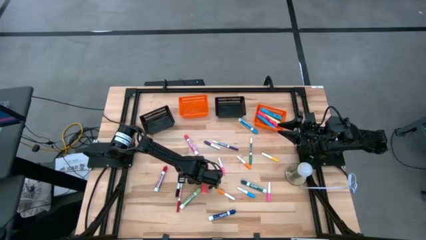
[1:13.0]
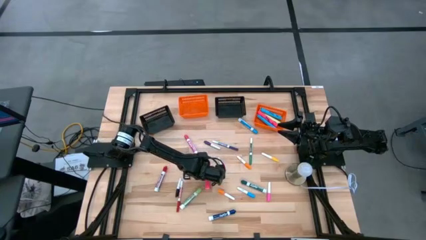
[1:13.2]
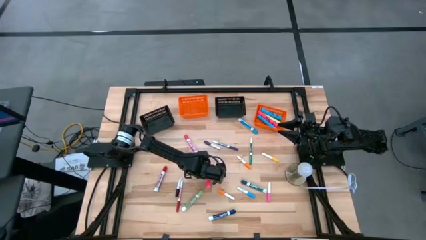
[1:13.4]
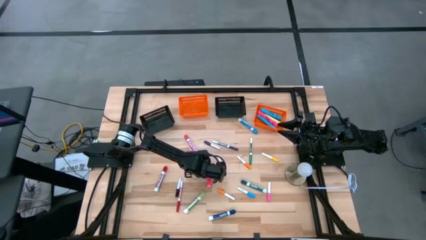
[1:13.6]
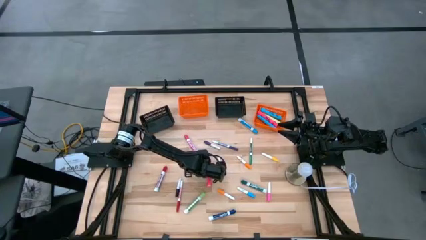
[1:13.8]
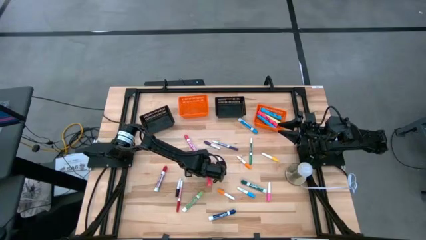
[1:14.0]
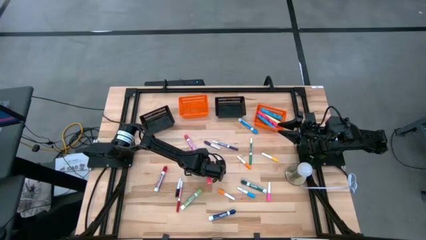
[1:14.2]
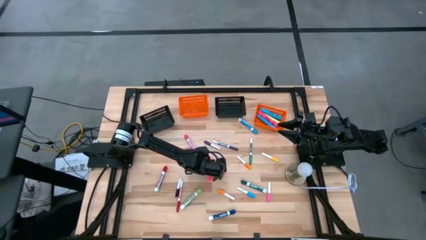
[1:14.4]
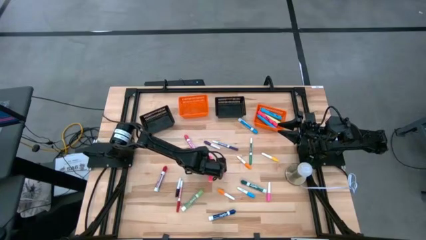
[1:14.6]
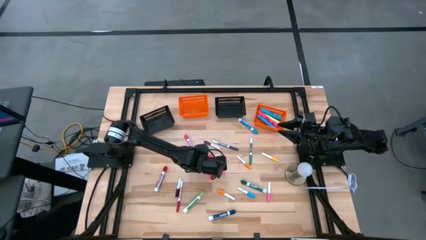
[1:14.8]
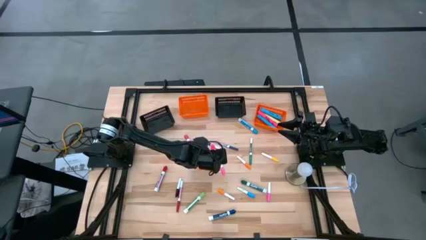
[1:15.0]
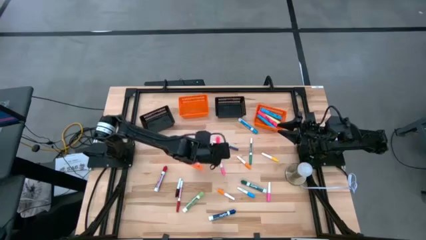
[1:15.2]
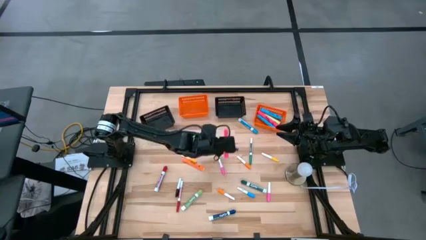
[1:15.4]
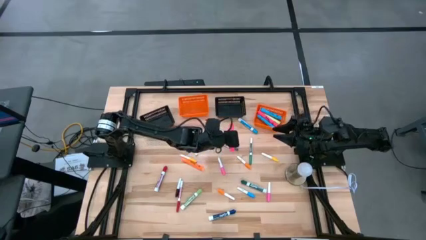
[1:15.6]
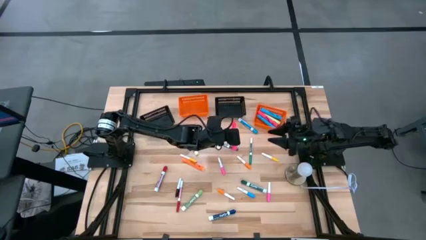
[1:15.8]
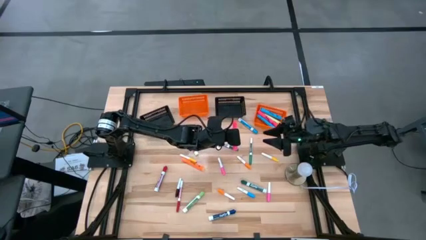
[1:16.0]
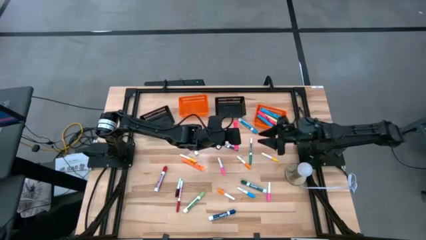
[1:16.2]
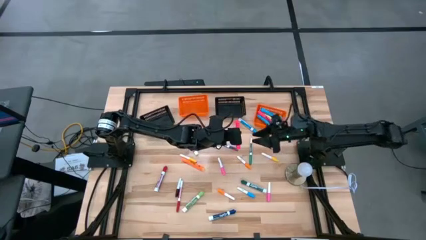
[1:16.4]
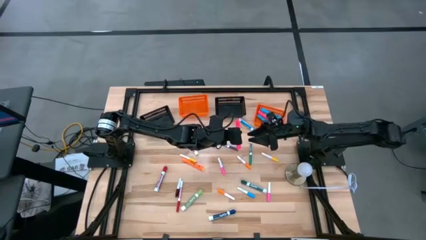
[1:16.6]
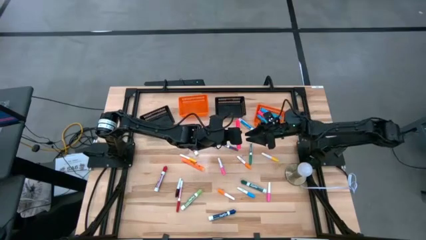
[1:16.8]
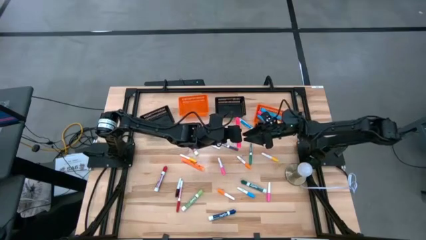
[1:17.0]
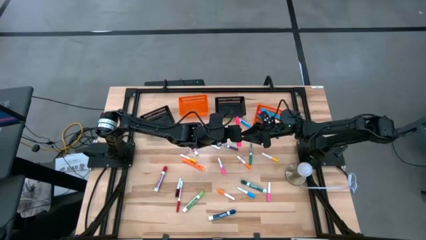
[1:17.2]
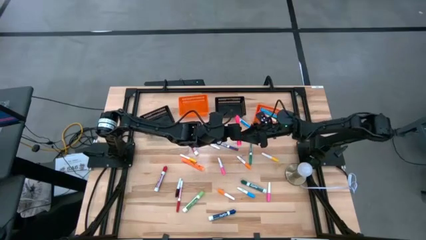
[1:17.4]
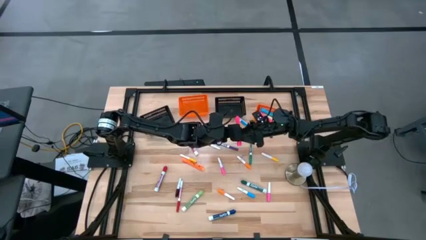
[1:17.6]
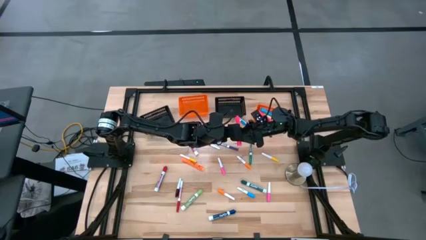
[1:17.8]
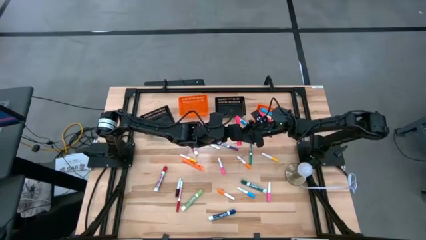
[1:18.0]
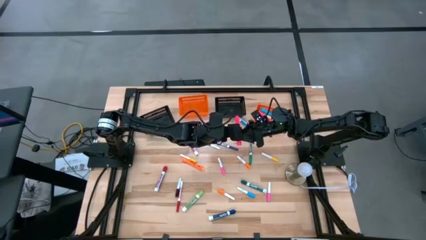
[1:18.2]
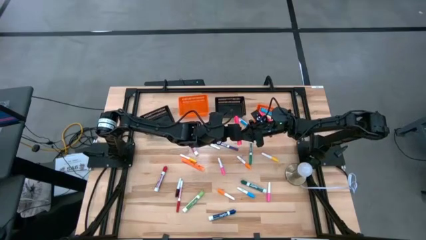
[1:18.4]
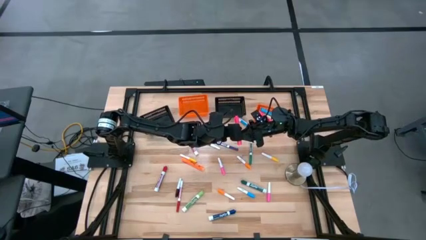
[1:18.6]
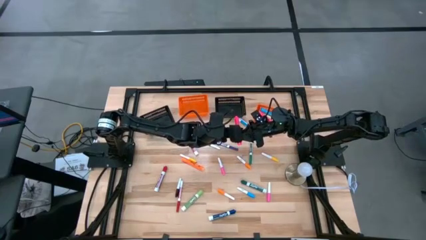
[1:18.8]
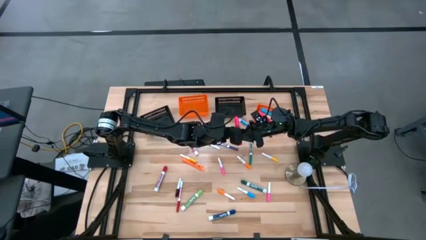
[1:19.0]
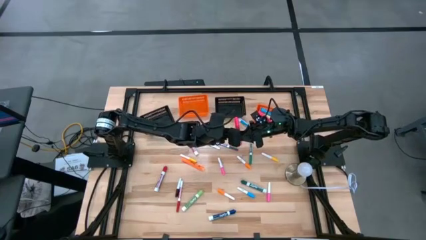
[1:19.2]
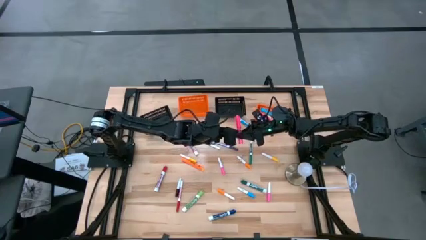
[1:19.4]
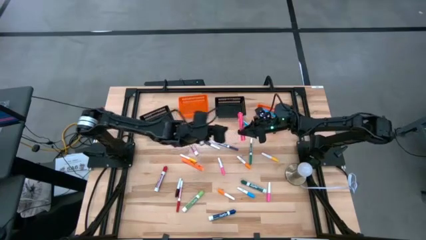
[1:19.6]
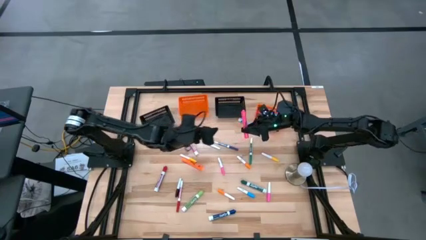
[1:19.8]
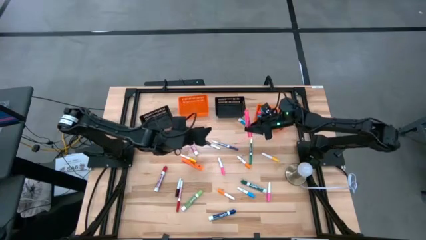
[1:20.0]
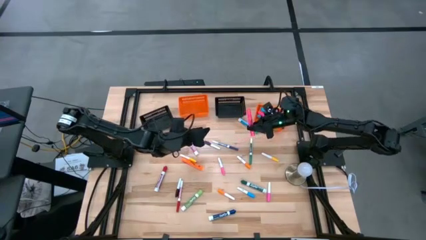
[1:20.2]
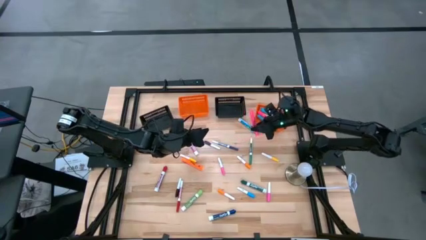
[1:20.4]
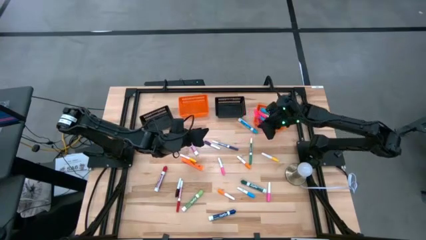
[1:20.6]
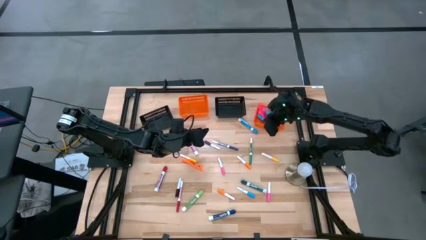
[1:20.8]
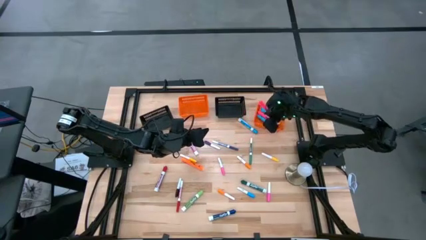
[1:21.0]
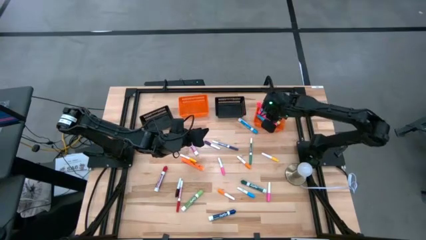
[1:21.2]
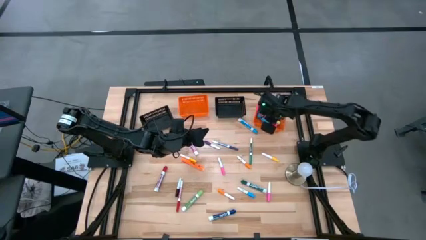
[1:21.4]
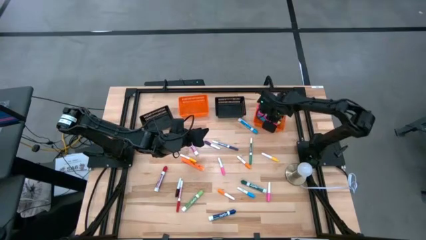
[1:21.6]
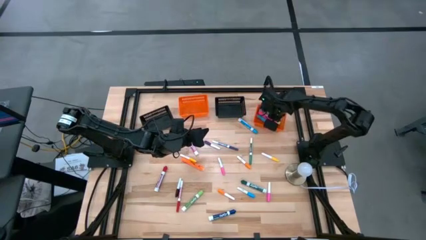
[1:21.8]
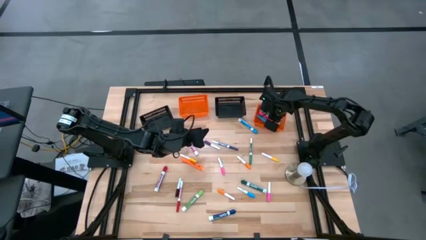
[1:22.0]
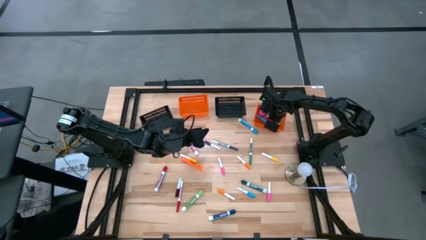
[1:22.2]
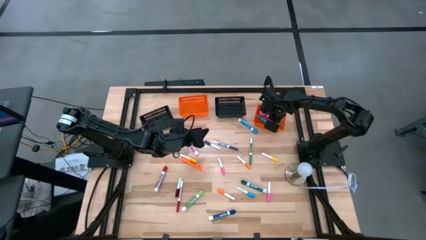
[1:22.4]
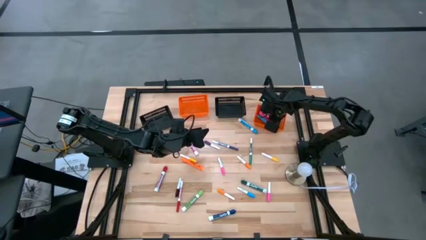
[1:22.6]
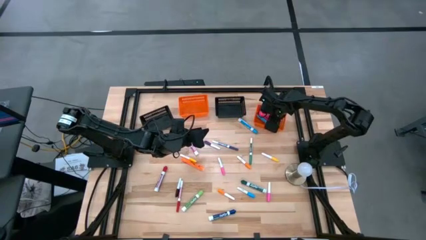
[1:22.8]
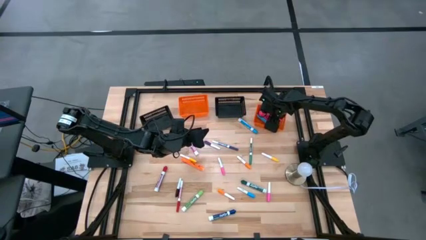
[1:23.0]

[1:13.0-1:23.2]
Task: Pick & Place Markers
Put the pink marker into the right orange bin

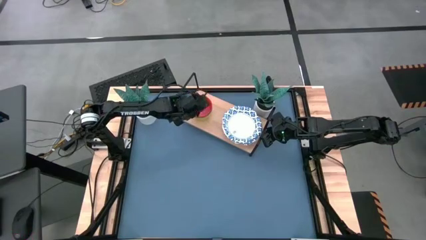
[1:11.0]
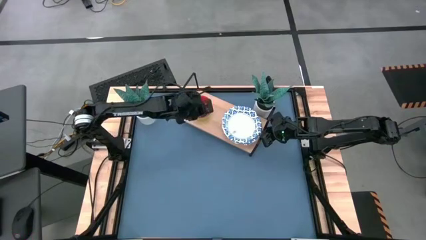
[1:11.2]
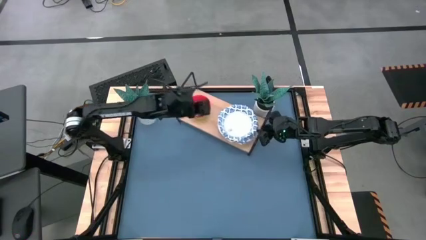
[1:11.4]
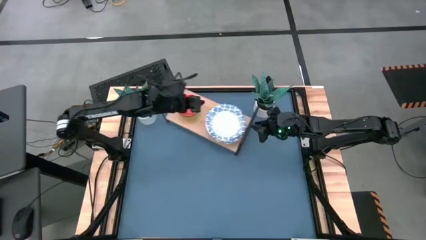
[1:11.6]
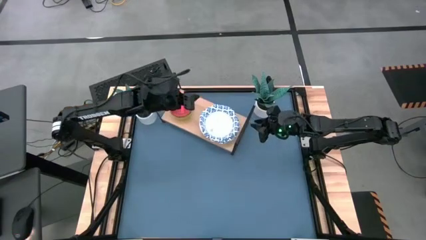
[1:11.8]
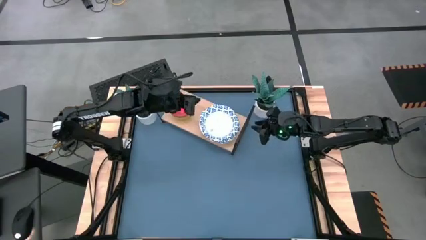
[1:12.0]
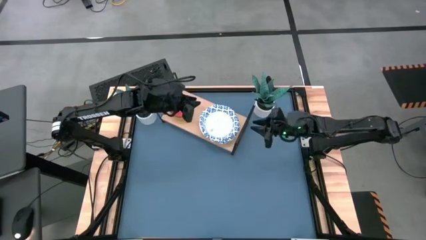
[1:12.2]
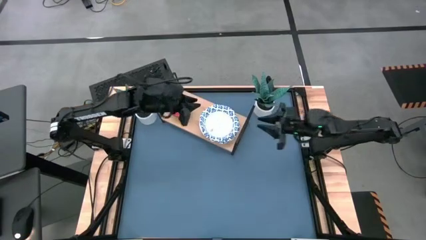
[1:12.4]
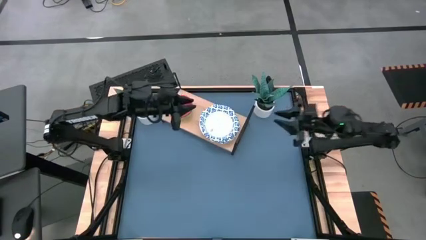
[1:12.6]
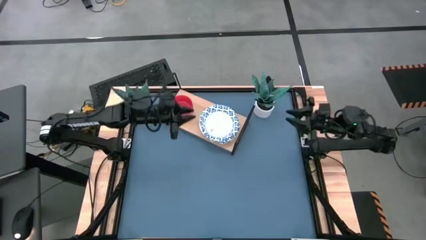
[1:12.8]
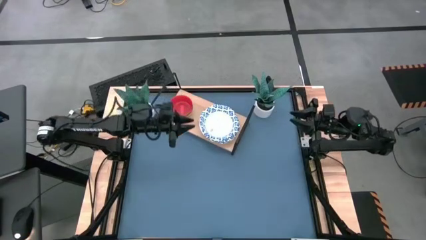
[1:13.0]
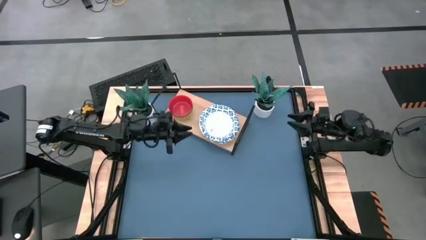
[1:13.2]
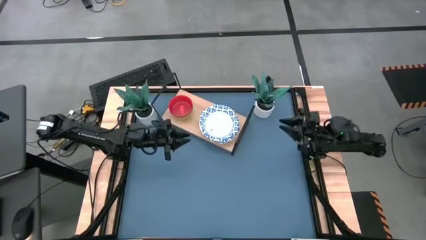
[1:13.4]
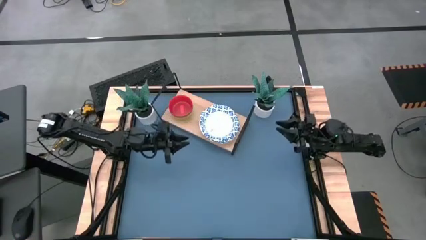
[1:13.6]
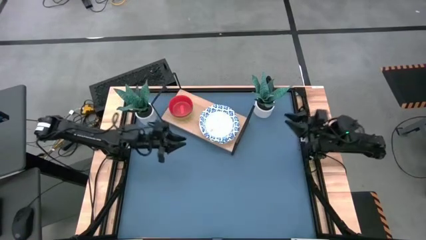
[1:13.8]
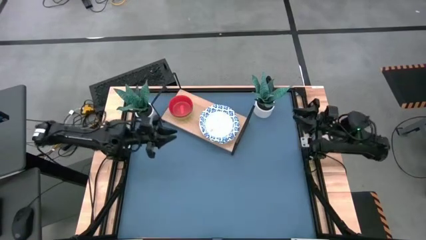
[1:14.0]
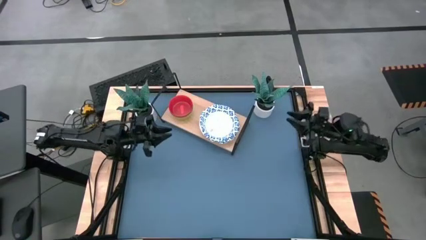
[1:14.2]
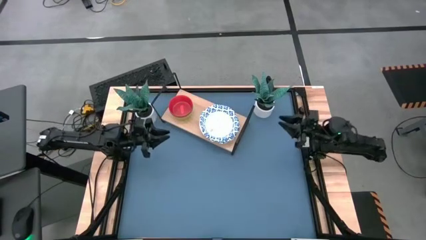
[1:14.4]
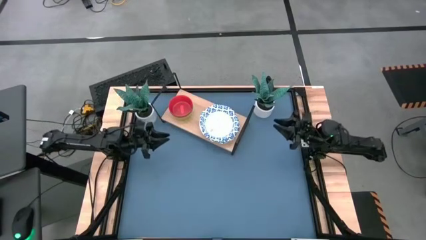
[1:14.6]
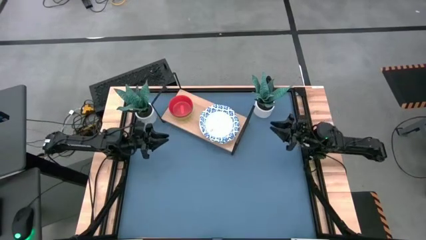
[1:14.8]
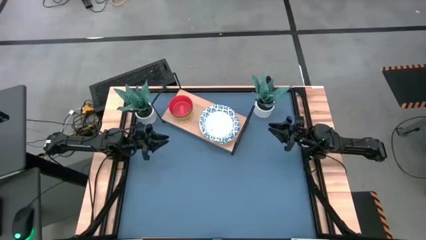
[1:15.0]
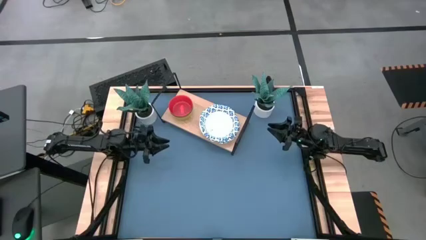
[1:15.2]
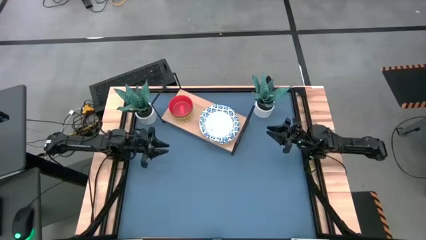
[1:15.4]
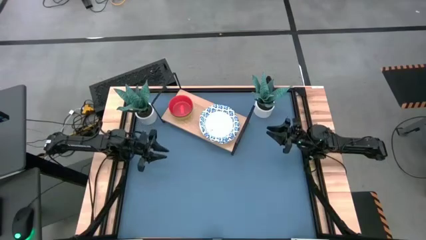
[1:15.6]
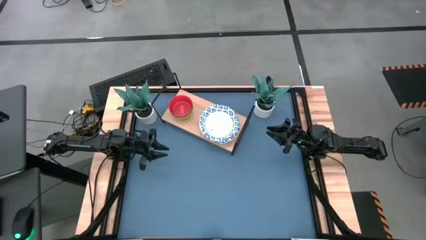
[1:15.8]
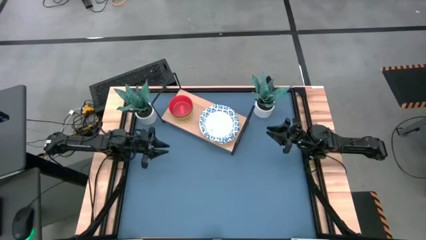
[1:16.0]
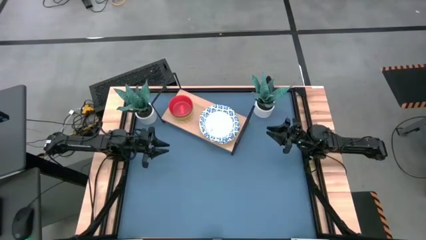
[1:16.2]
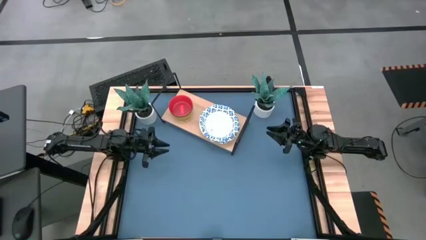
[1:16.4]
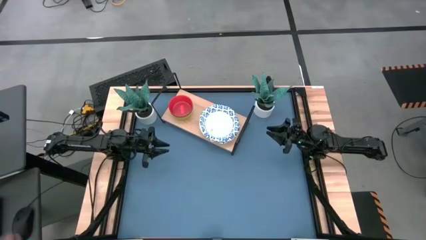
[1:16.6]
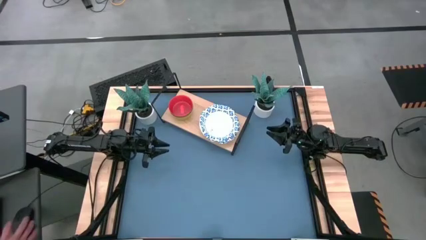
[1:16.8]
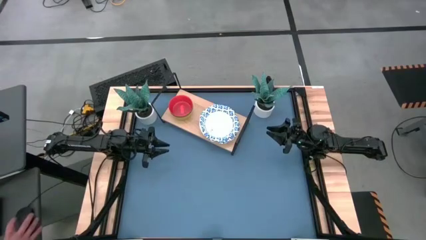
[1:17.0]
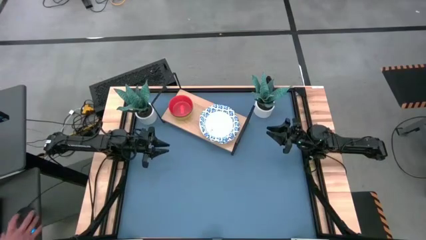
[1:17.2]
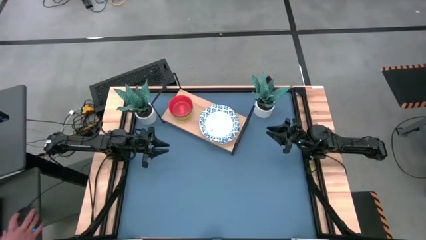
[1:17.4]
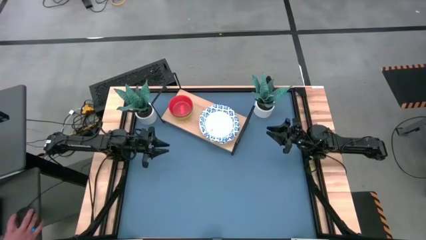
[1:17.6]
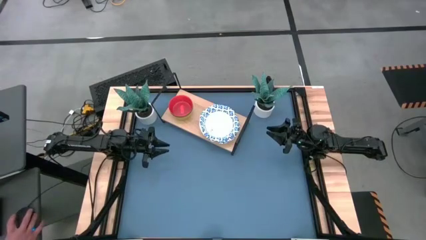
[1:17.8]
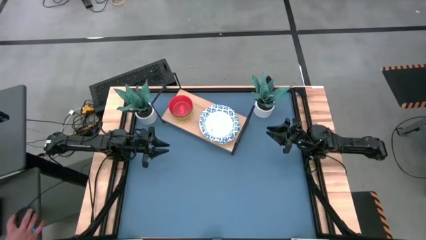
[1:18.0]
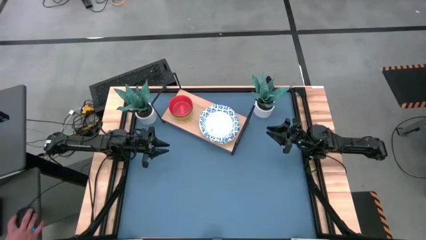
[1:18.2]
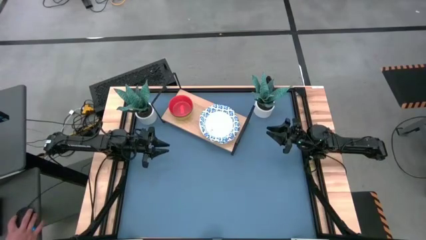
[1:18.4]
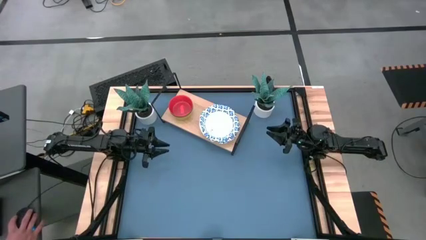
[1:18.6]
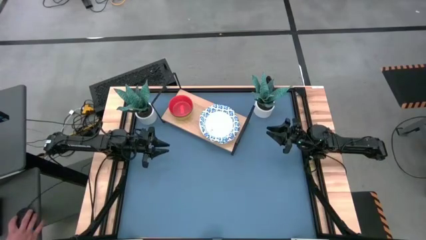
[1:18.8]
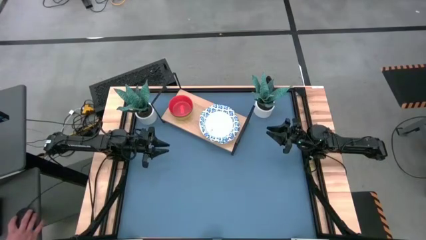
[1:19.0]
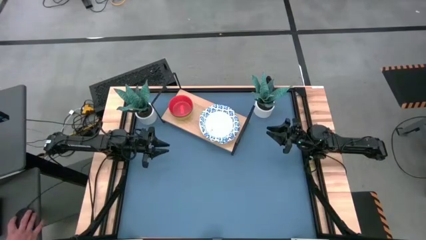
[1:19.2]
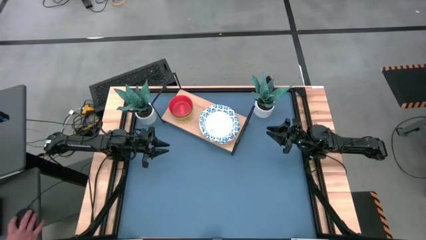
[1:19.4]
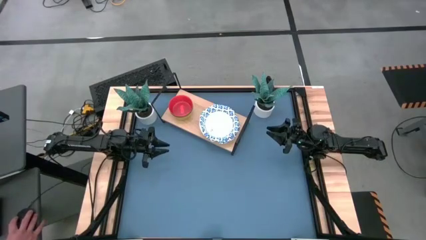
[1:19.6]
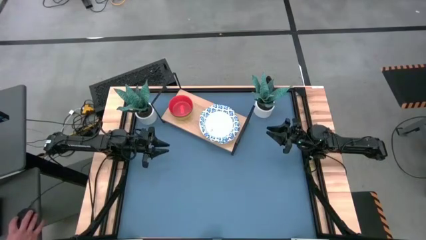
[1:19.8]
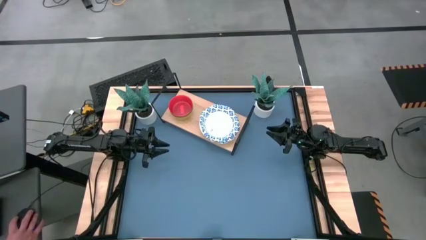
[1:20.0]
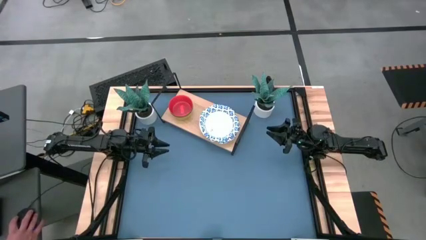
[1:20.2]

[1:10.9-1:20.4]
Task: Place and stack bowls onto a shelf
Return to Home Position
